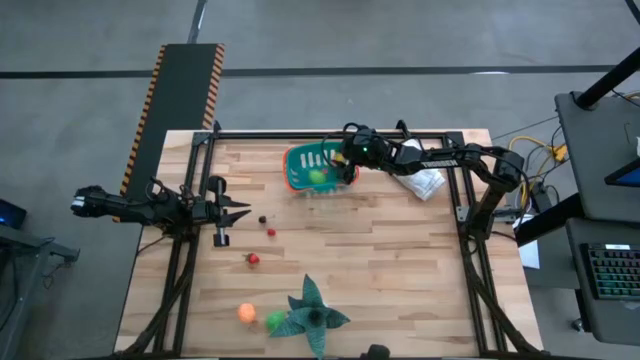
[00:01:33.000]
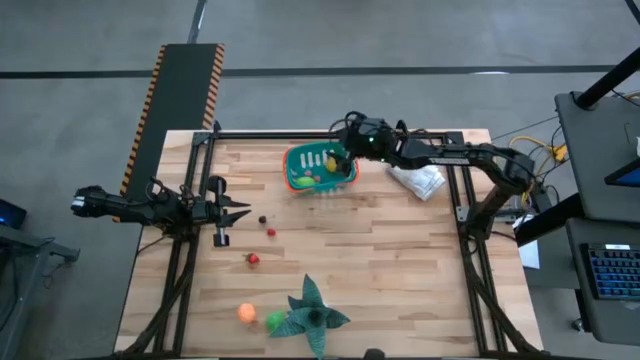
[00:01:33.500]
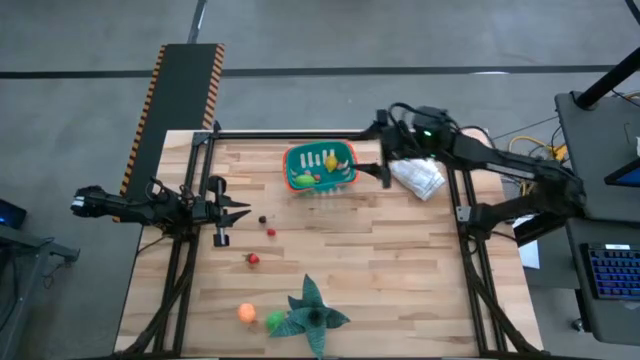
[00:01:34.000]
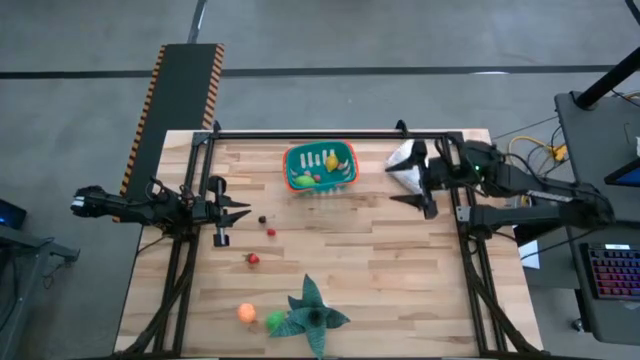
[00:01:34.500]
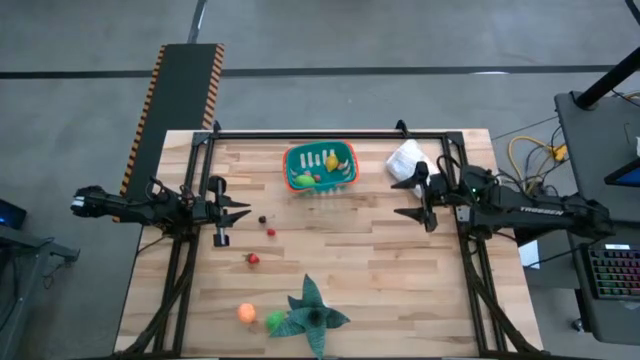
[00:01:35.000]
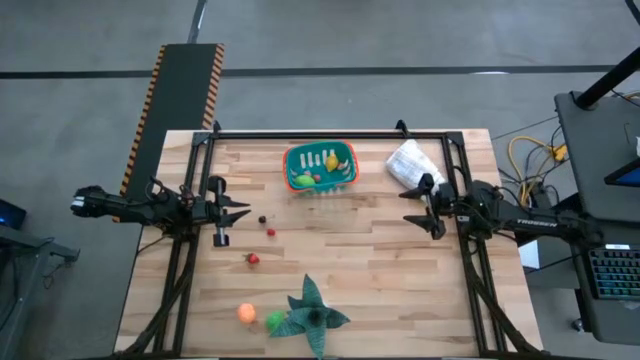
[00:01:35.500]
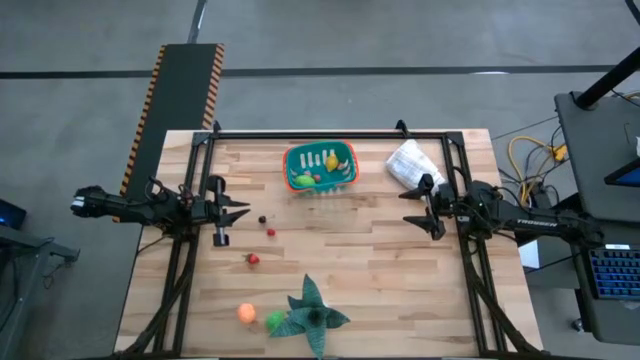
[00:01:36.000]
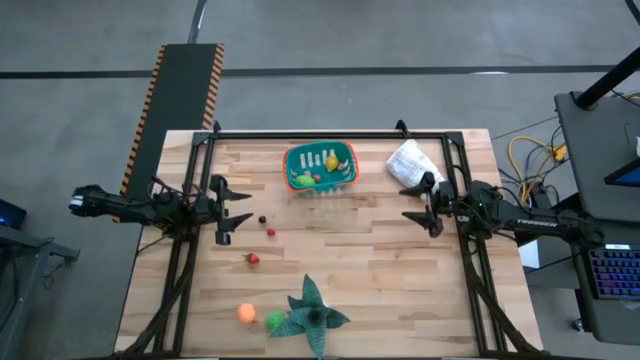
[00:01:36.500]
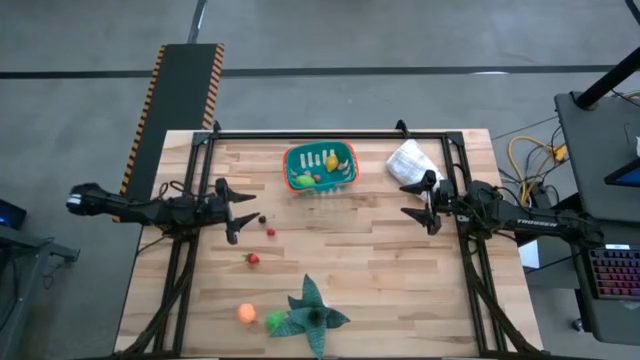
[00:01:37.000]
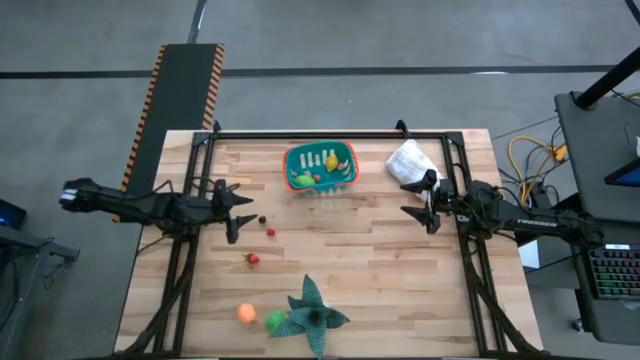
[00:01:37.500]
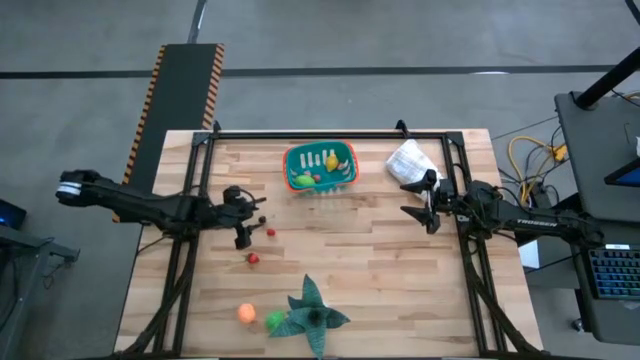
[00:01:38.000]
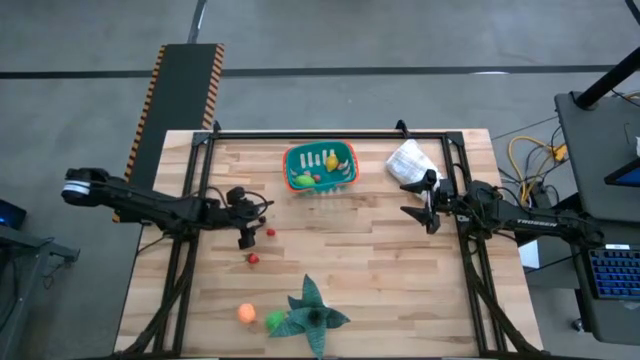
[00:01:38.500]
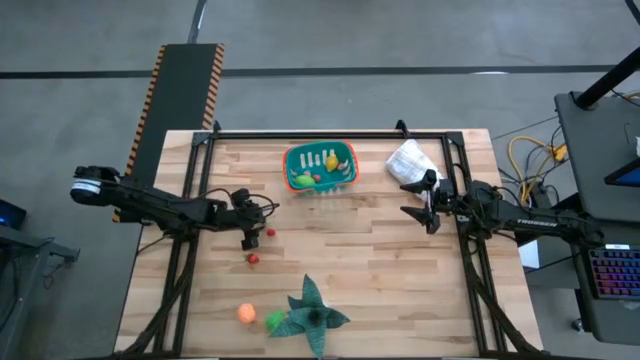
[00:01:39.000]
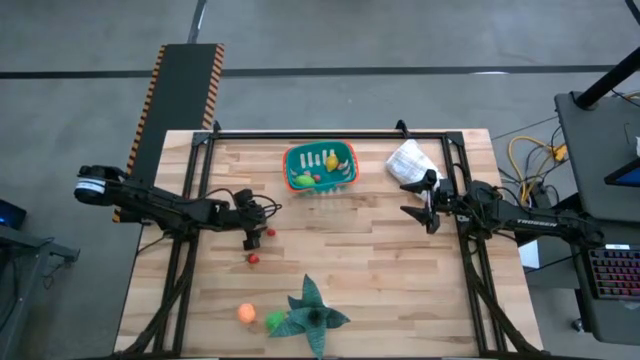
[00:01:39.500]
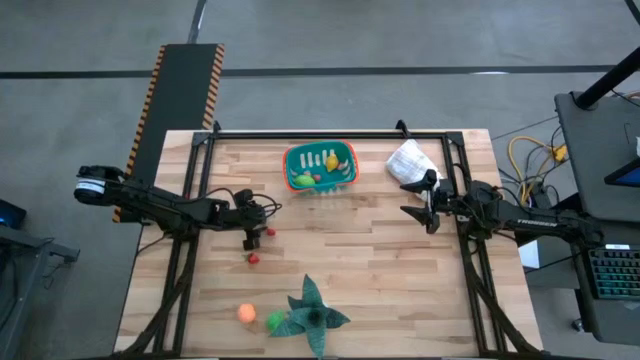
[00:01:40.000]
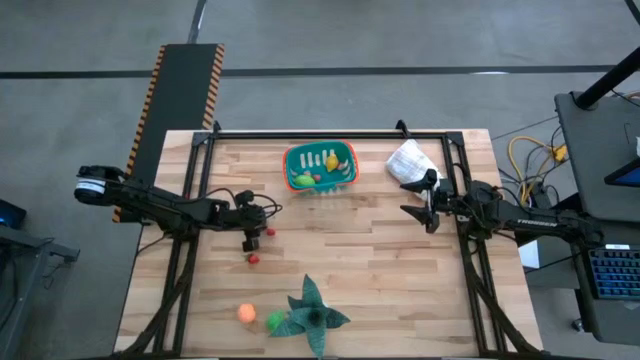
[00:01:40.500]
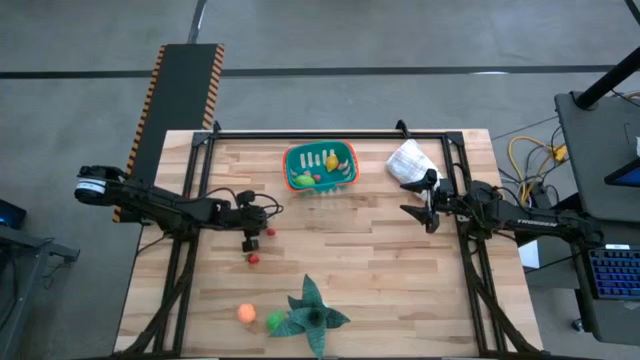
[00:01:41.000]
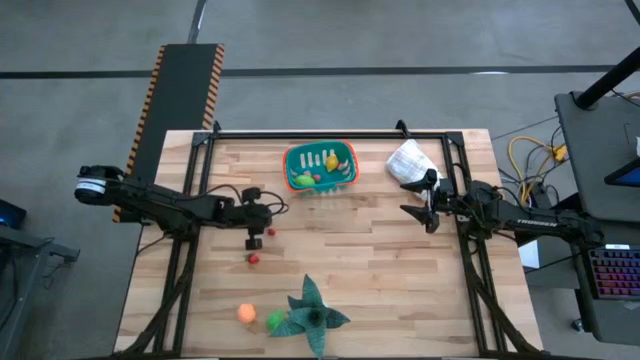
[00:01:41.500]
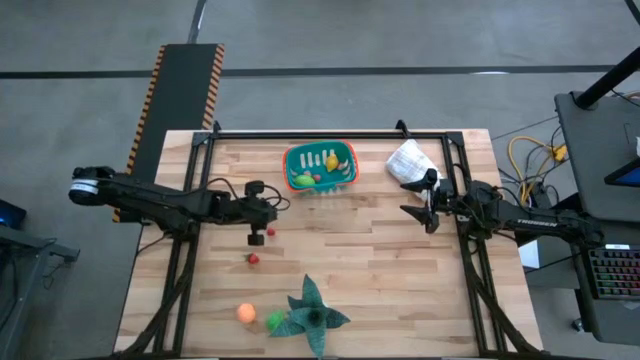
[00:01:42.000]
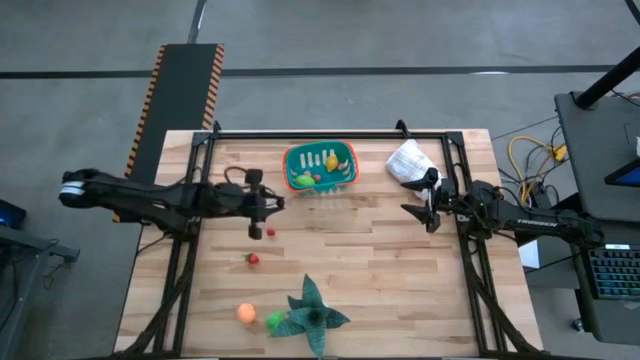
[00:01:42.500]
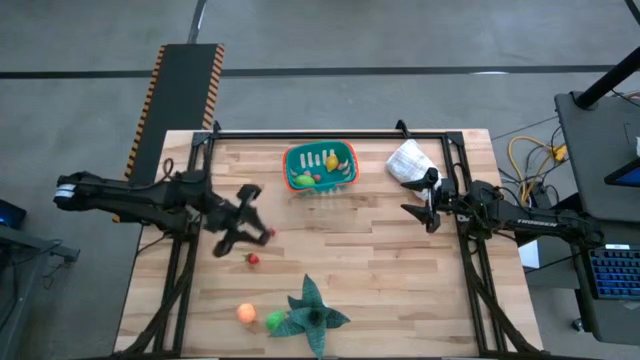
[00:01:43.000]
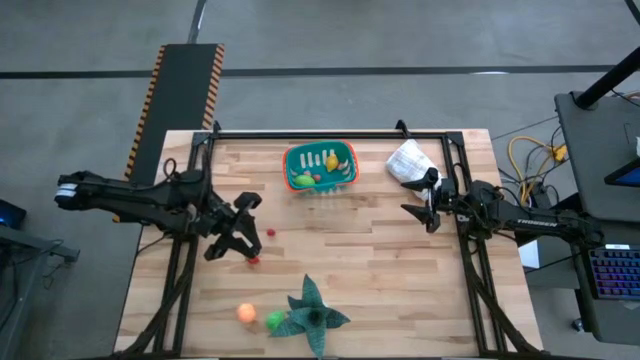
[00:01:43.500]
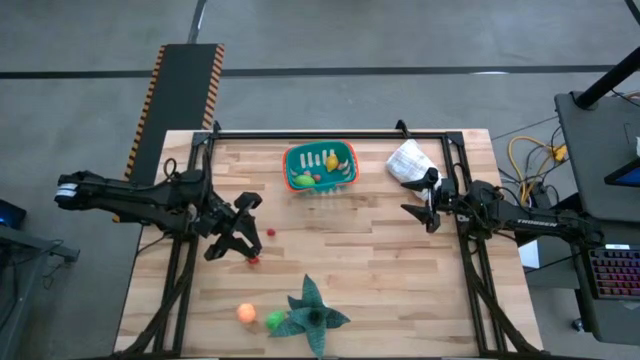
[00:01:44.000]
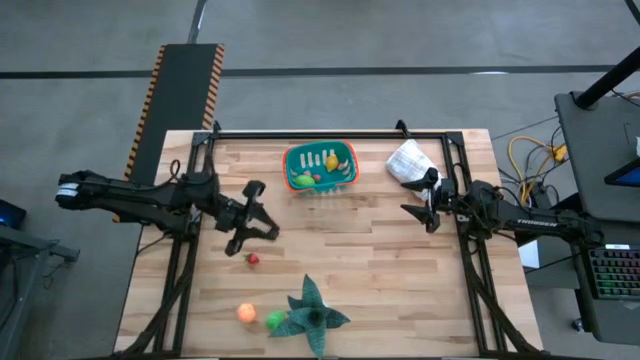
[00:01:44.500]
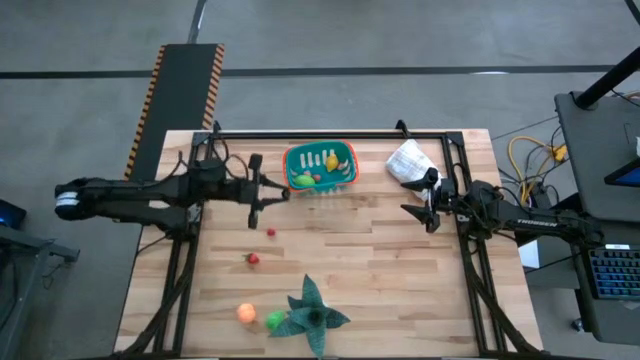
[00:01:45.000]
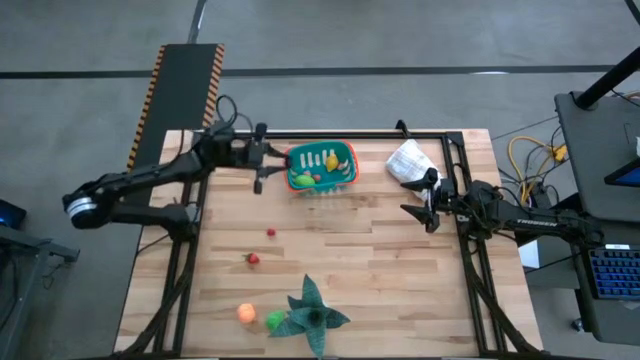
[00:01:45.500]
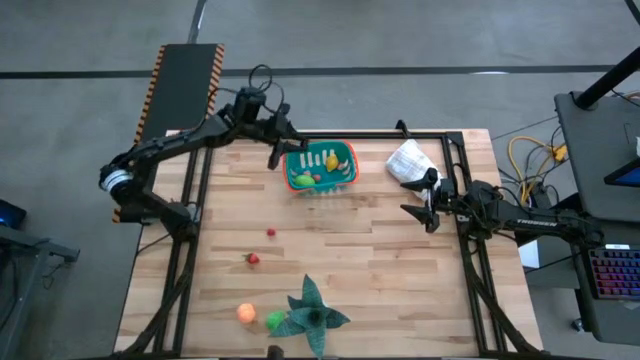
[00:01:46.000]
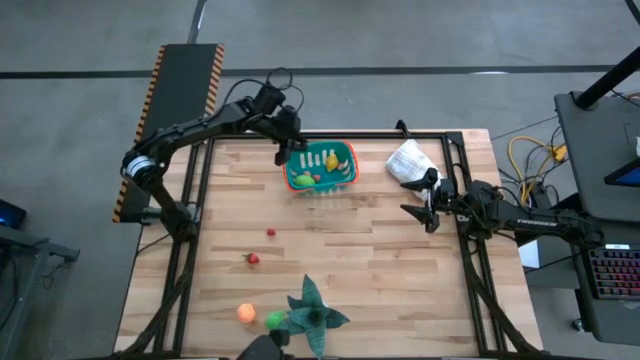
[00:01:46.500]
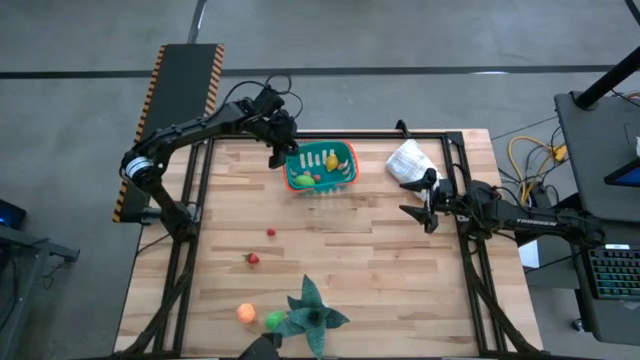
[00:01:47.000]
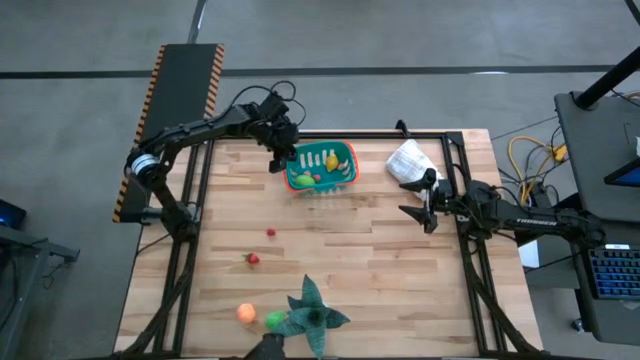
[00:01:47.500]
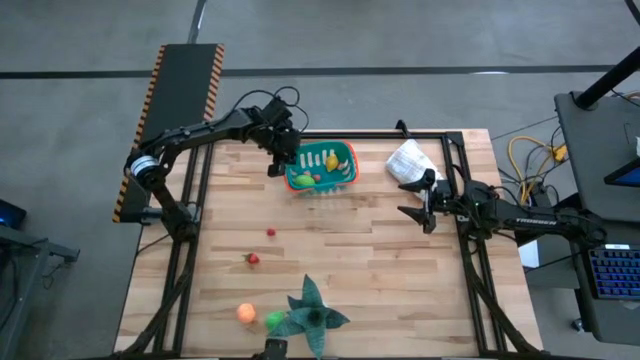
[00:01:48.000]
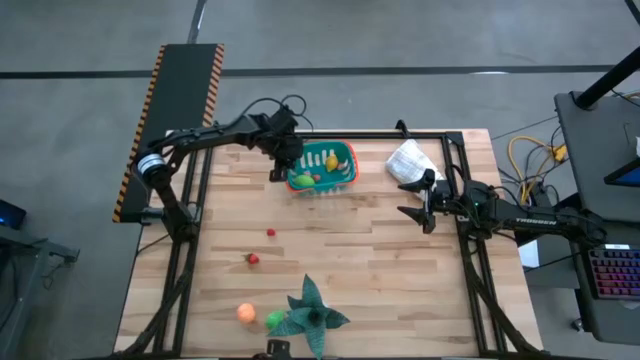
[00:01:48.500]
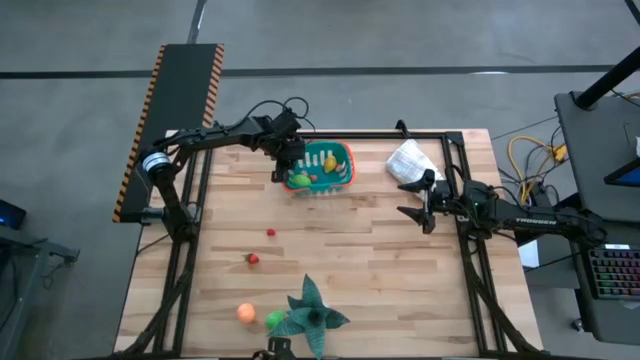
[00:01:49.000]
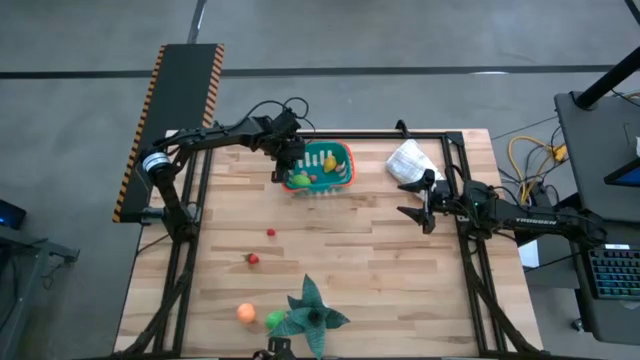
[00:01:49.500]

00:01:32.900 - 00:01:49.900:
Task: Pick and placing Produce into tupperware
Put the black cherry toy into the bin

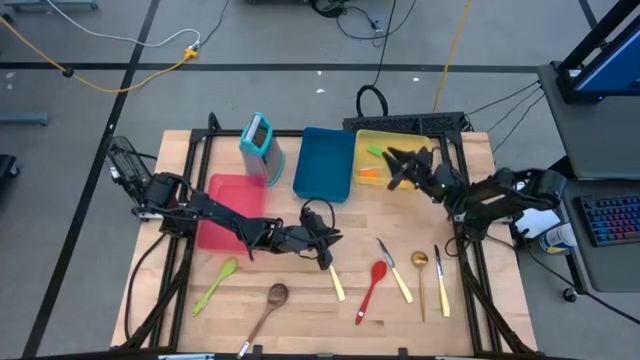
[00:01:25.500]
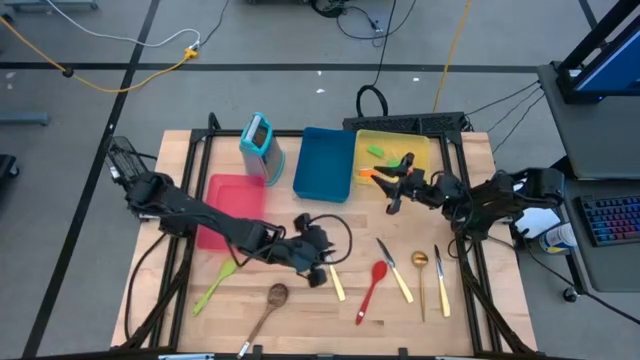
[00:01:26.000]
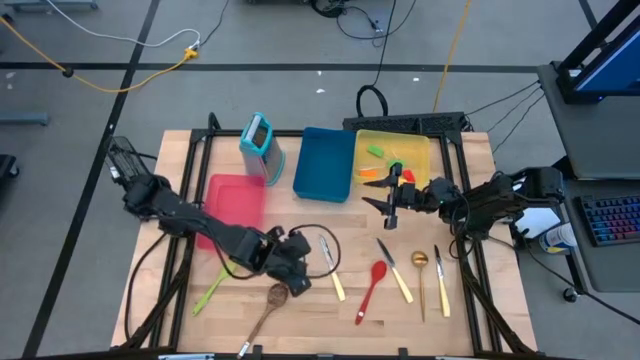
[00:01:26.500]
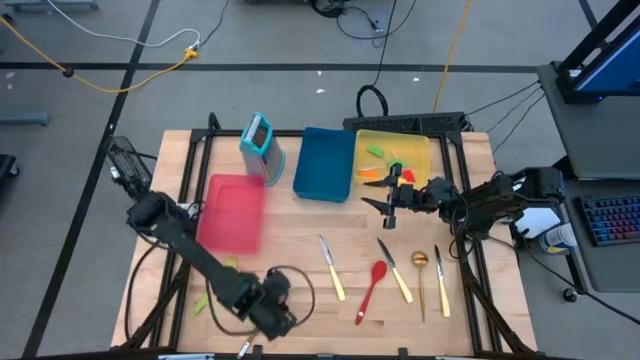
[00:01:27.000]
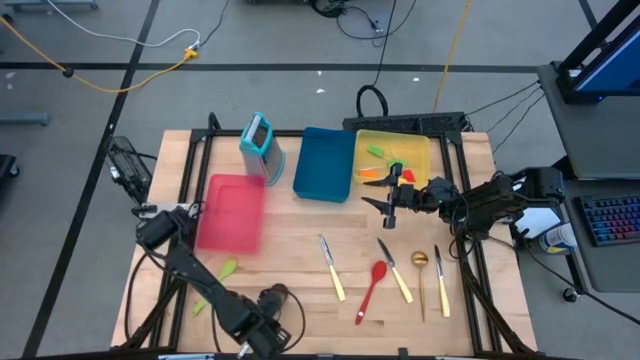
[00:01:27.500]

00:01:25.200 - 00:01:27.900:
Task: Pick & Place Kitchen Items
Put the brown serving spoon into the pink bin

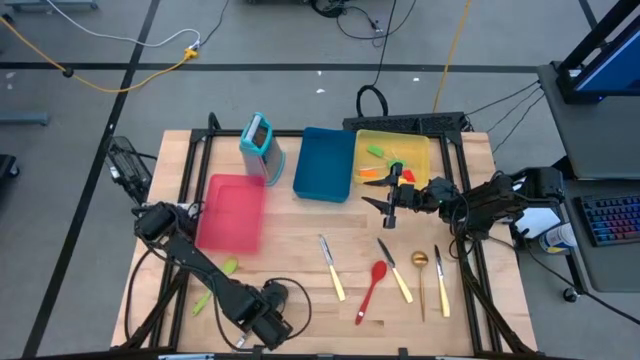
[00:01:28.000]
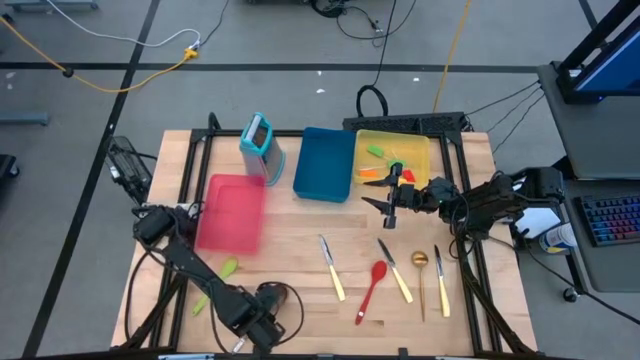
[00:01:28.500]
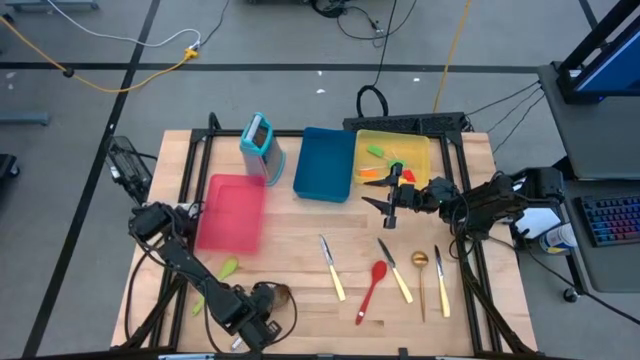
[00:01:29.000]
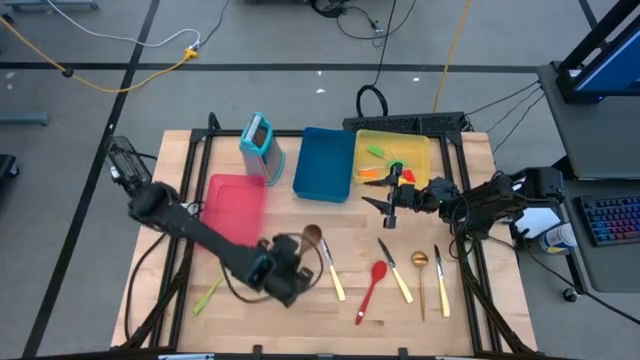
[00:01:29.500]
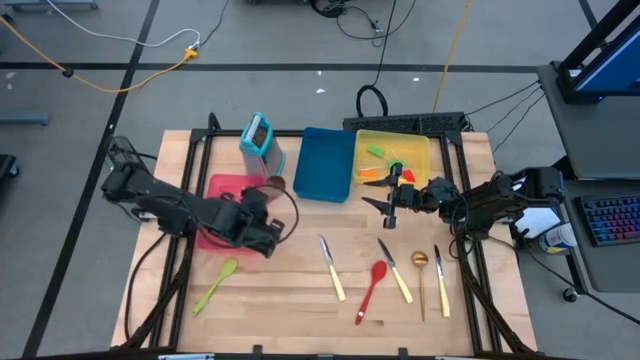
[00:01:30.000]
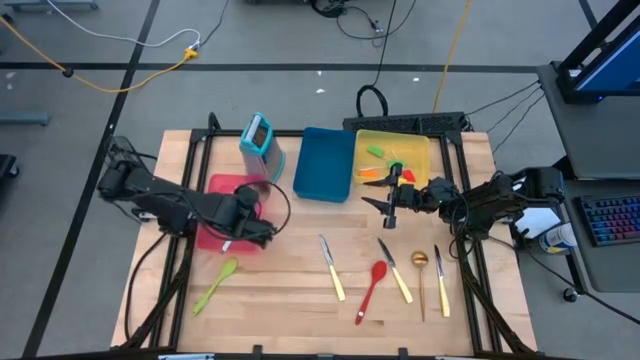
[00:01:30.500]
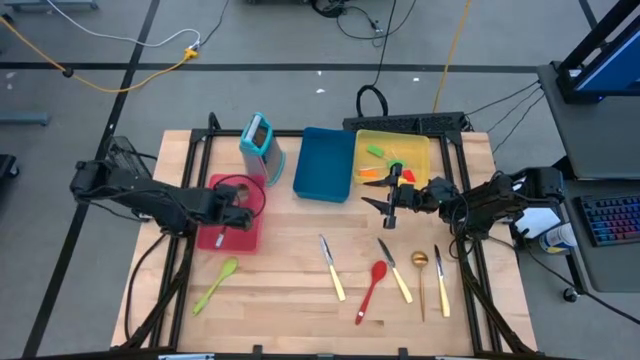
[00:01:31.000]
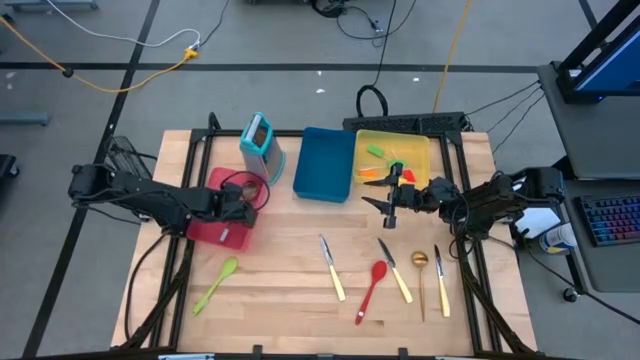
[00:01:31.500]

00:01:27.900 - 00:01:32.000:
Put the brown serving spoon into the pink bin
